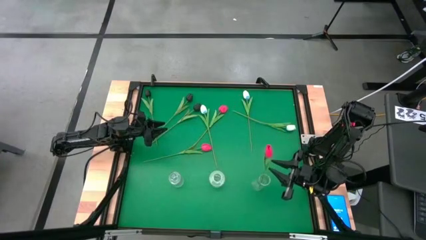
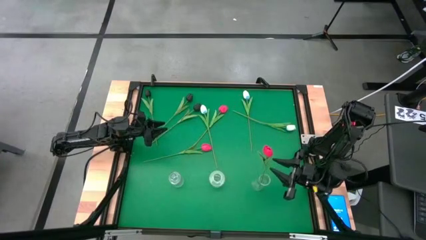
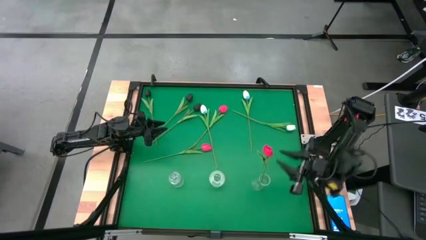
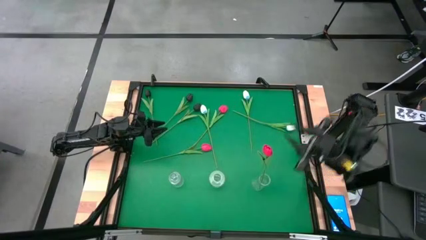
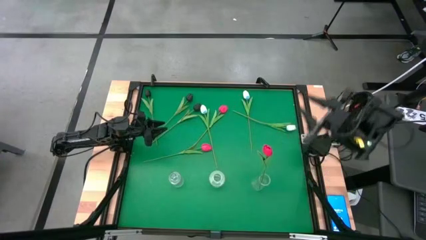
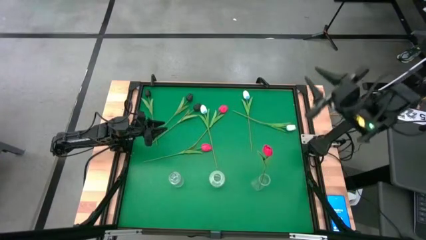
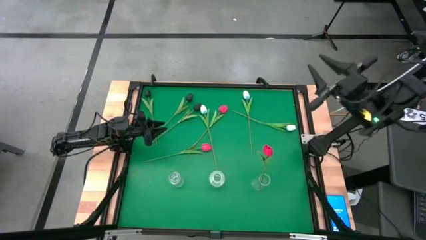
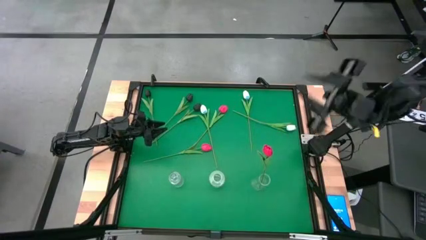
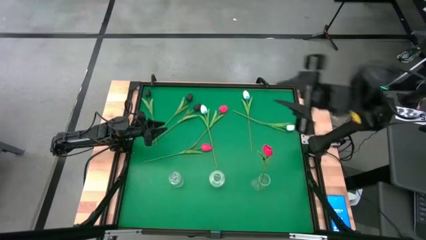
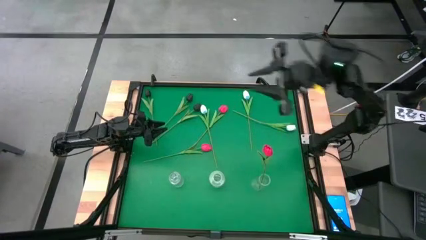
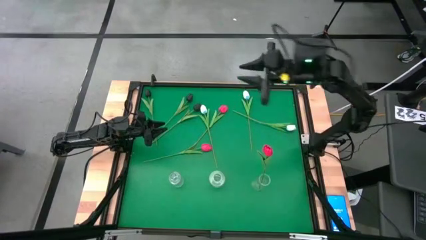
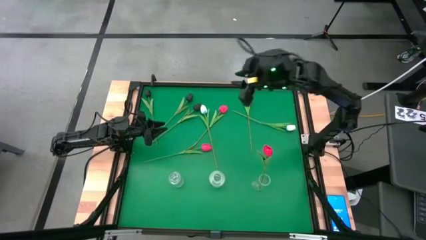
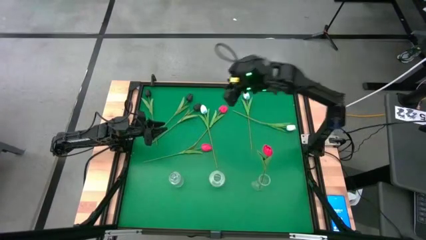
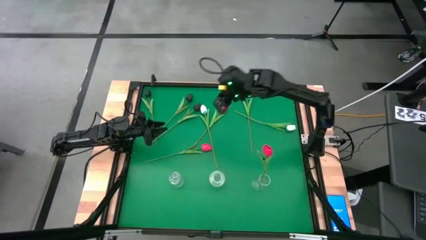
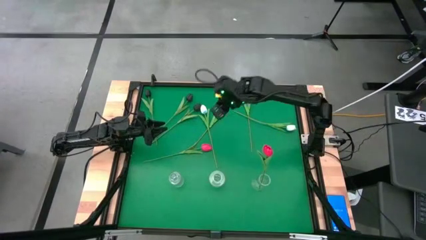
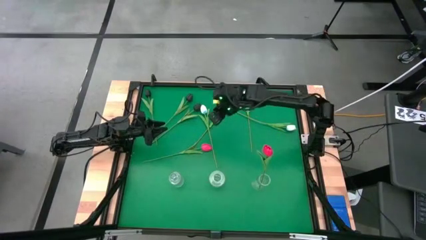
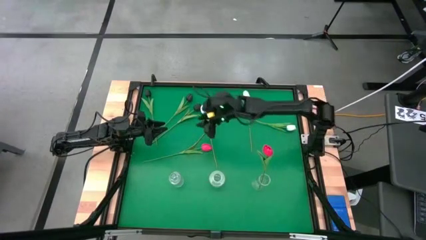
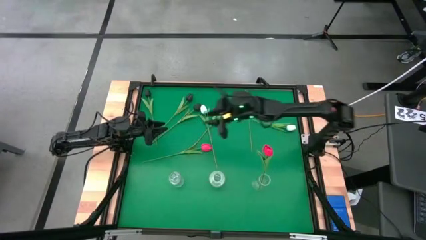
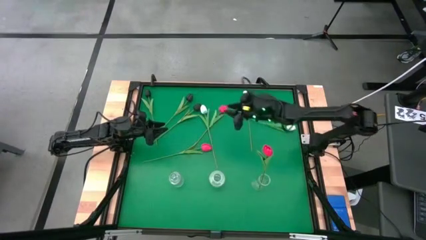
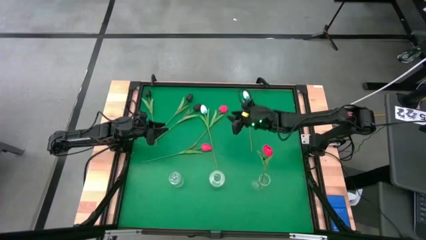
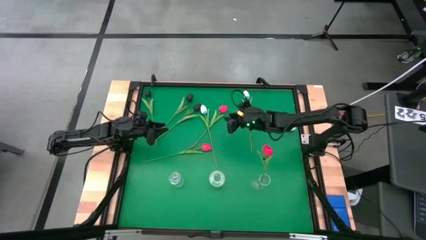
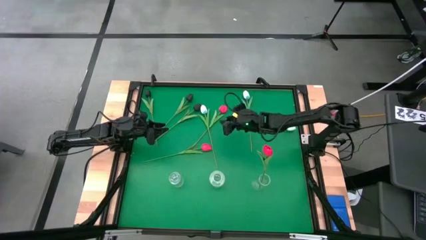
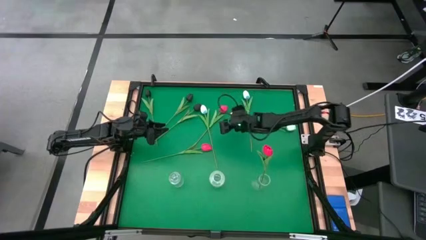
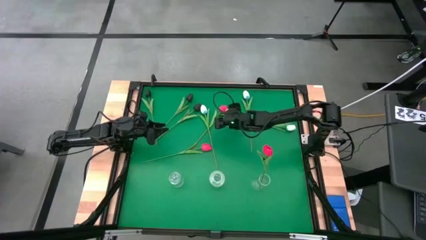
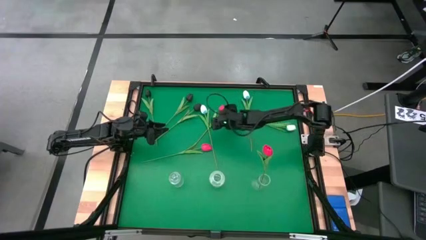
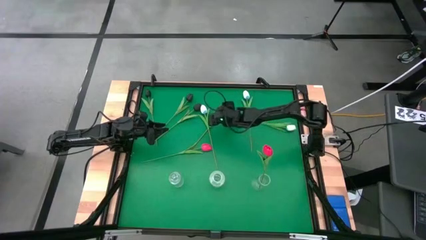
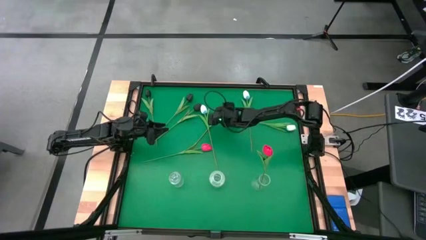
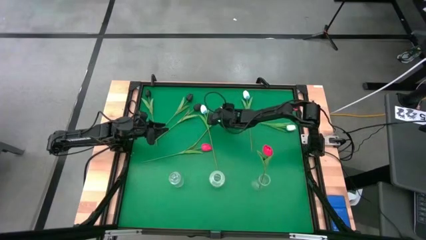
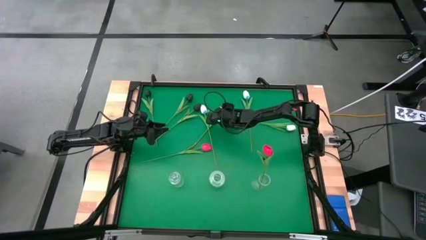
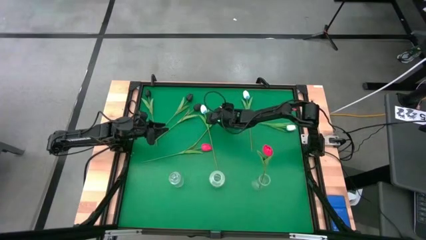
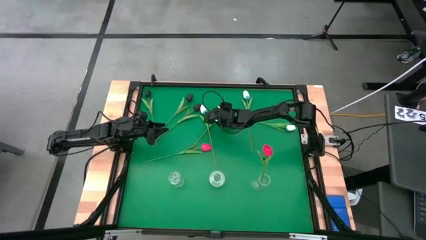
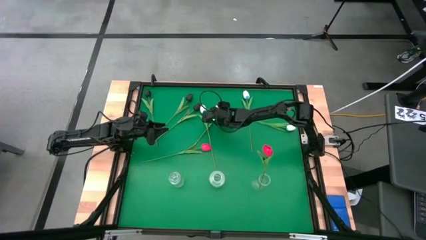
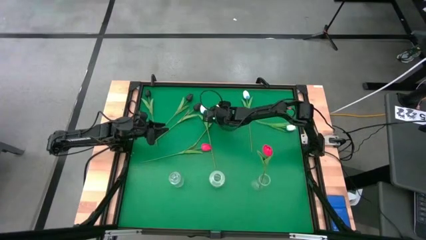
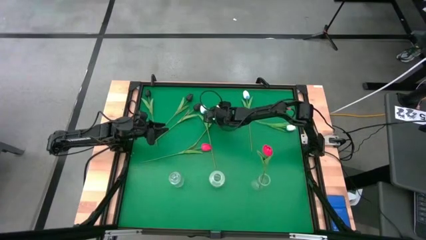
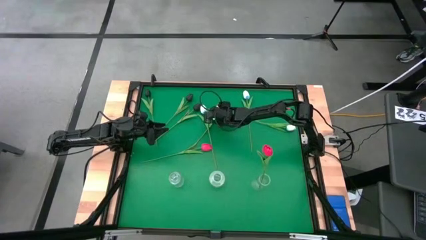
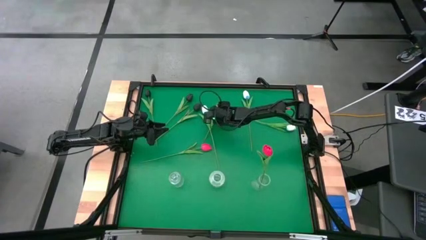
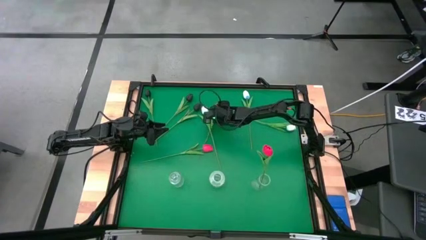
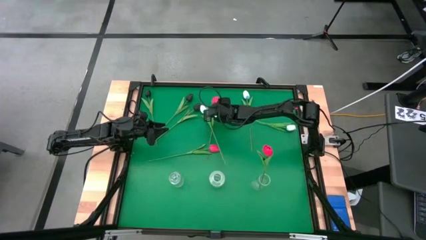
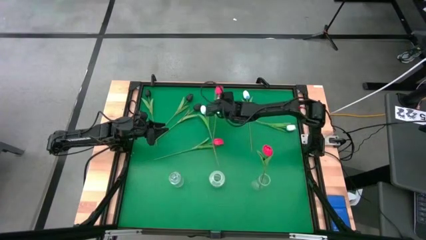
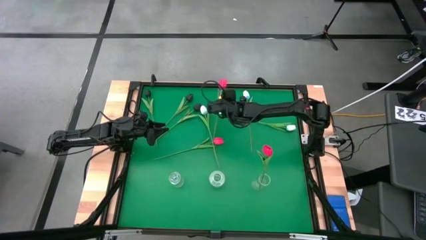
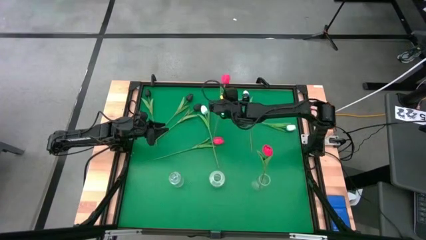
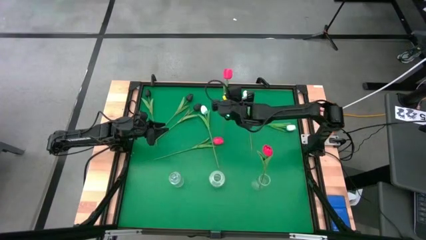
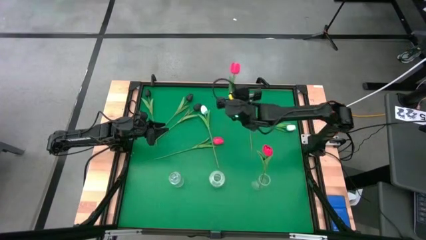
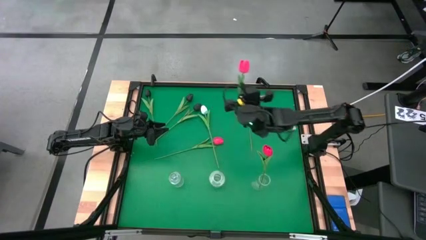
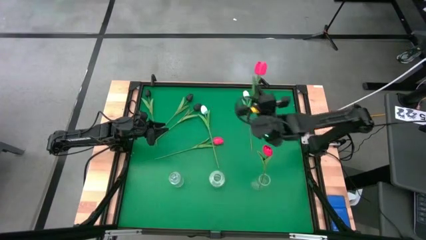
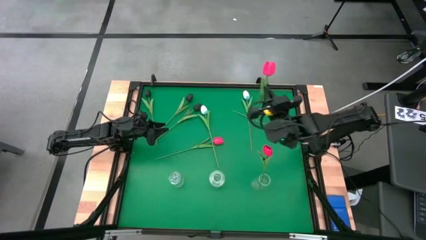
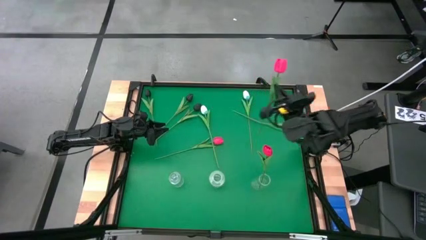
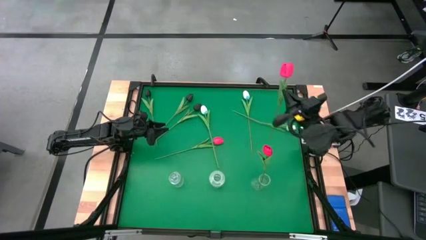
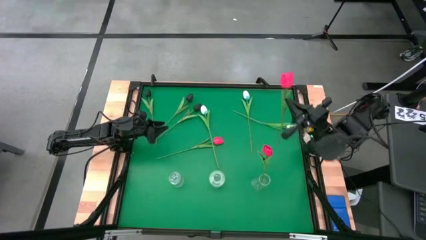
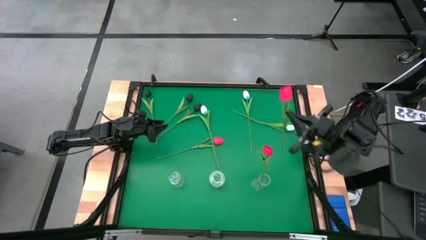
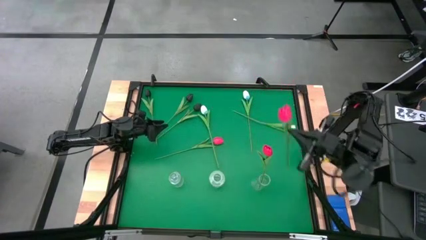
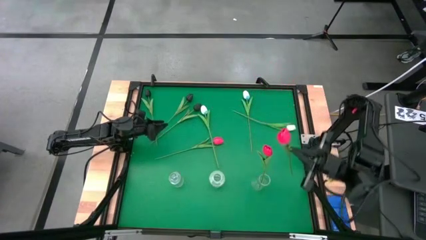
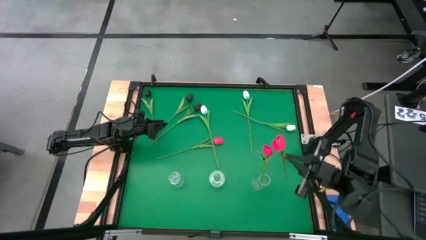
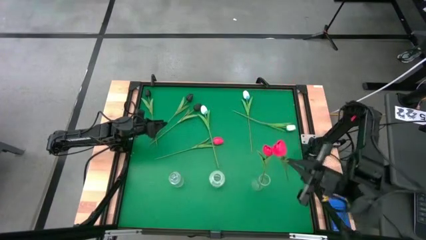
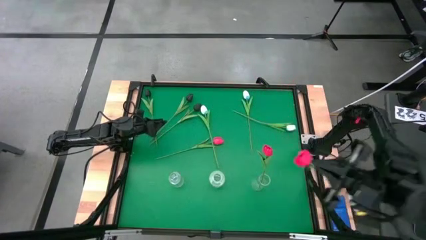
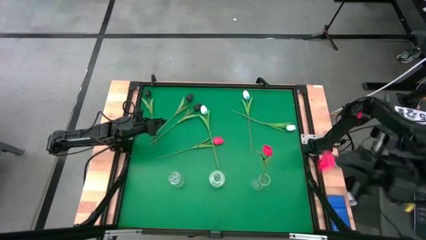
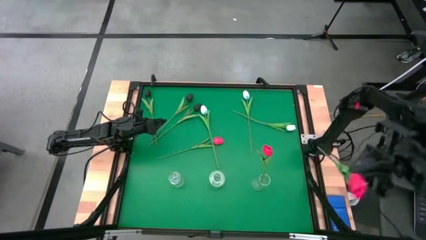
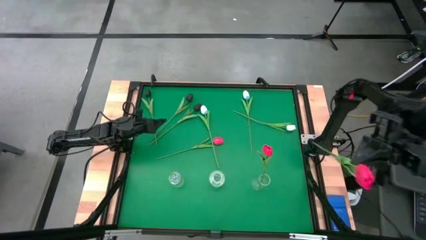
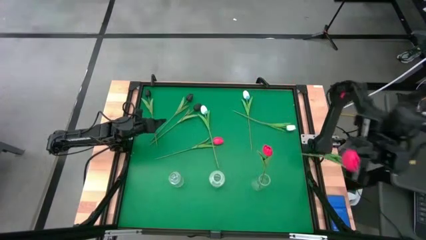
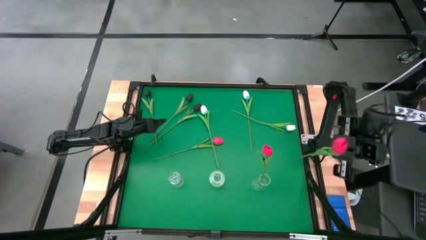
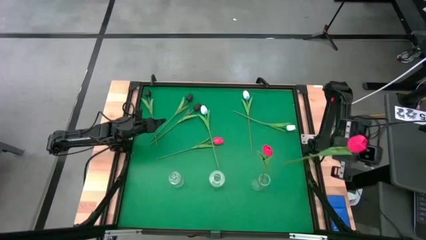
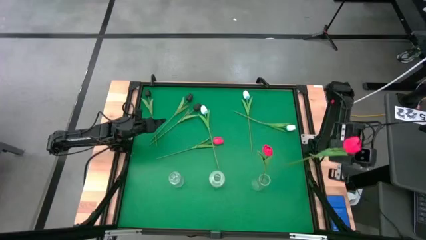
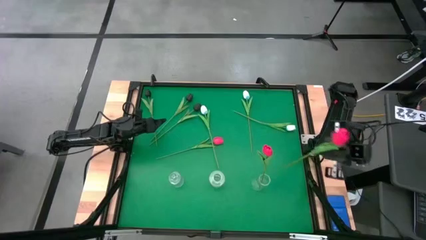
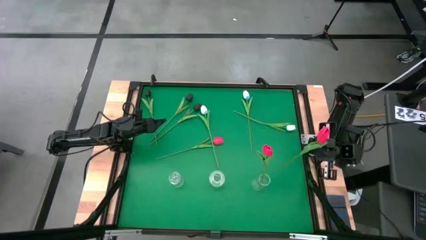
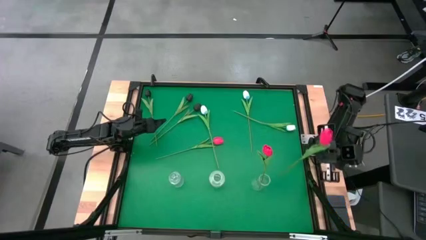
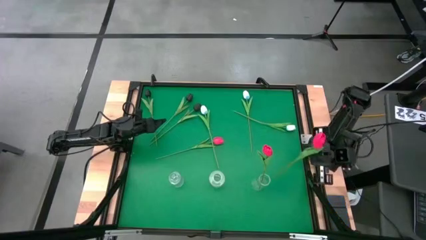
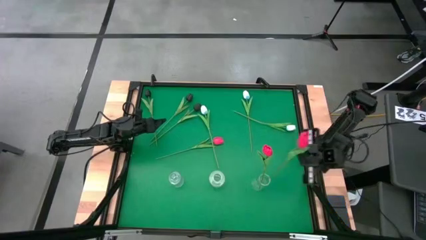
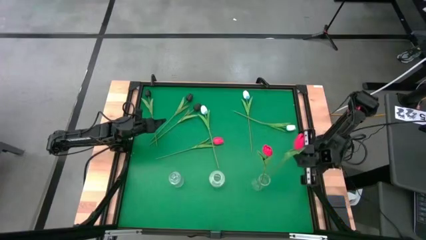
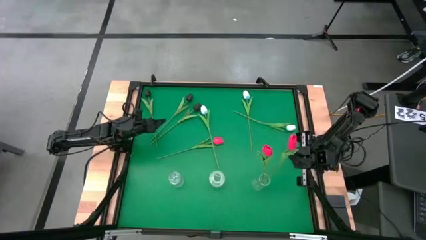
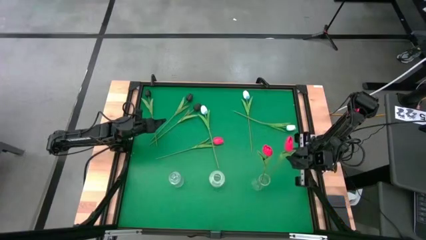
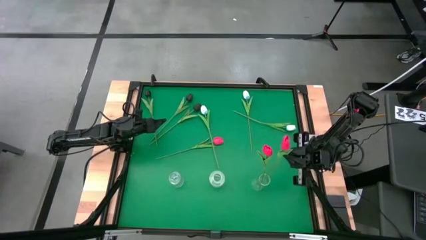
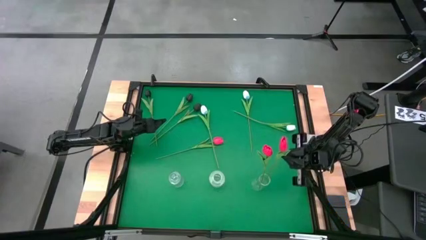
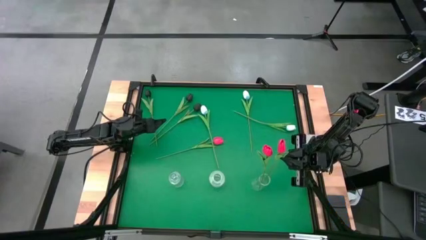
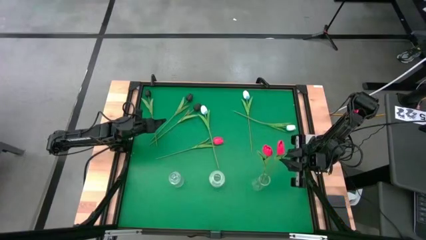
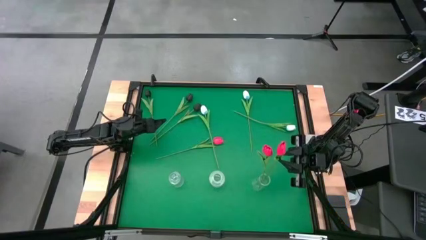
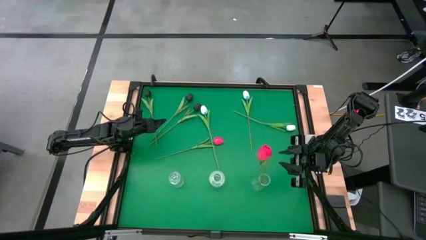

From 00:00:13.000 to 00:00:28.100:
Task: Sort flowers into vase by color
Put the top pink tulip into the right transparent vase
